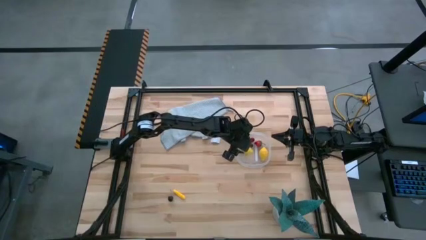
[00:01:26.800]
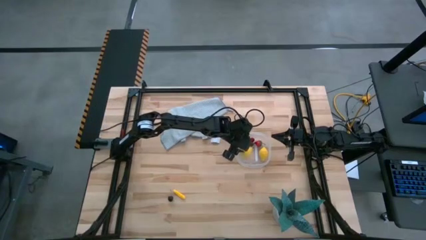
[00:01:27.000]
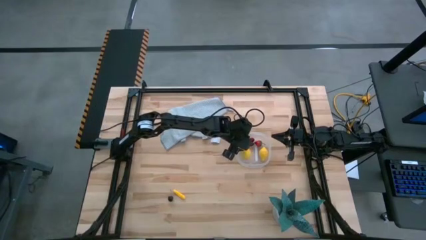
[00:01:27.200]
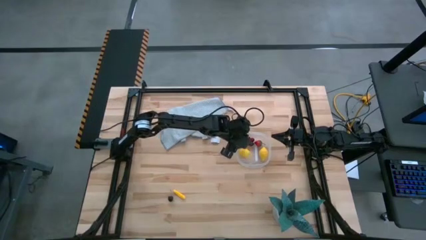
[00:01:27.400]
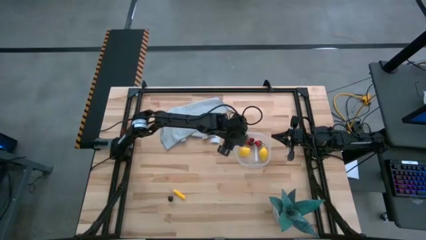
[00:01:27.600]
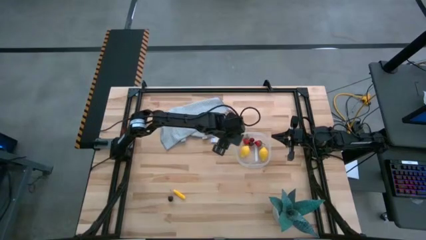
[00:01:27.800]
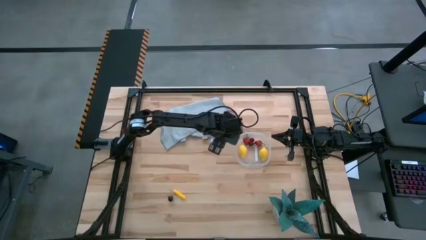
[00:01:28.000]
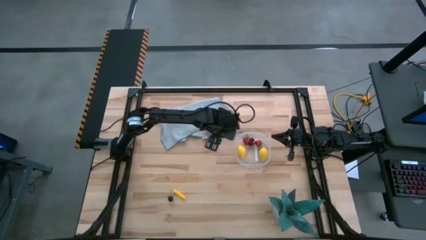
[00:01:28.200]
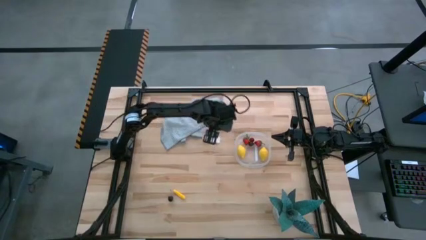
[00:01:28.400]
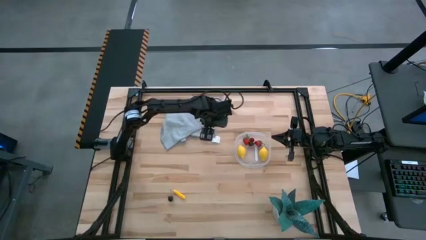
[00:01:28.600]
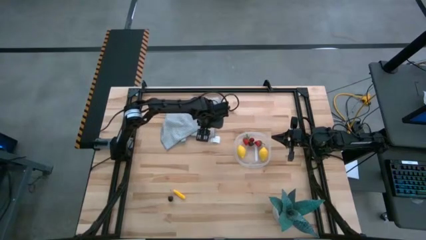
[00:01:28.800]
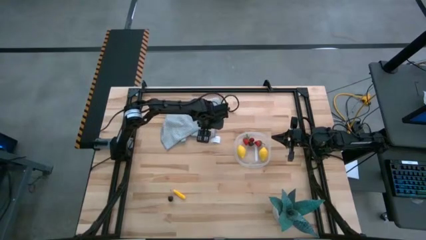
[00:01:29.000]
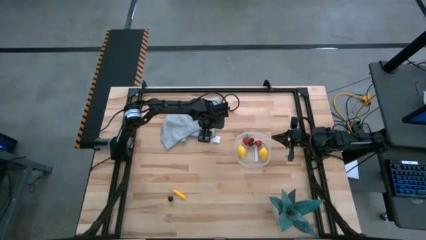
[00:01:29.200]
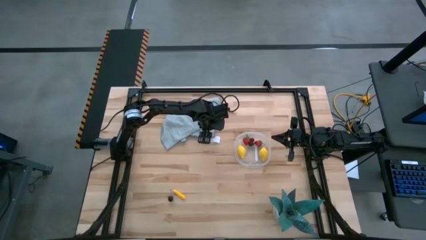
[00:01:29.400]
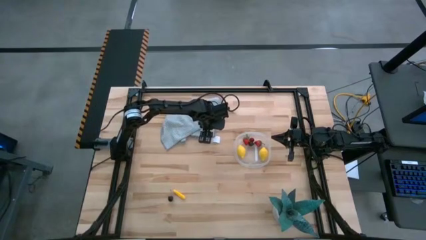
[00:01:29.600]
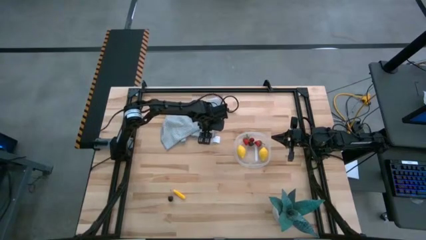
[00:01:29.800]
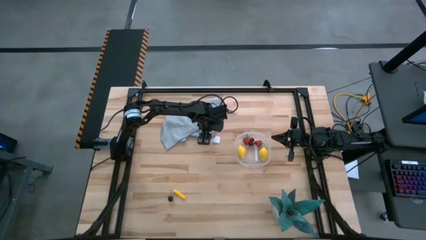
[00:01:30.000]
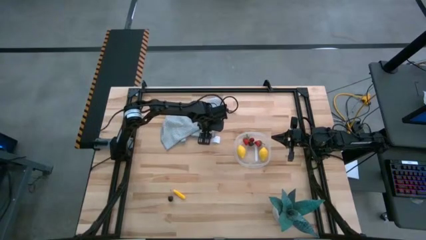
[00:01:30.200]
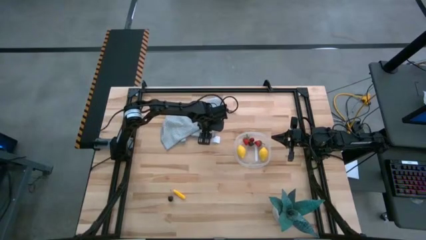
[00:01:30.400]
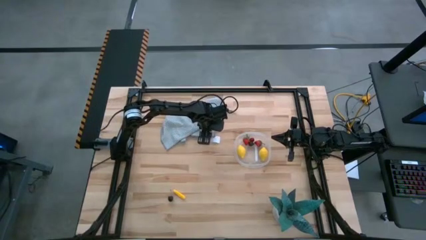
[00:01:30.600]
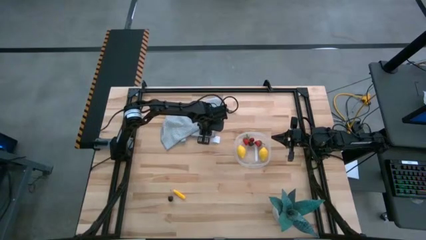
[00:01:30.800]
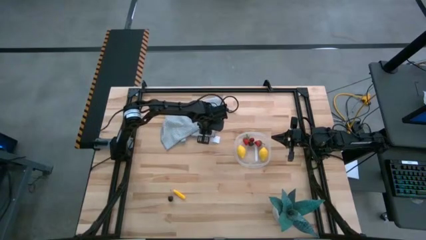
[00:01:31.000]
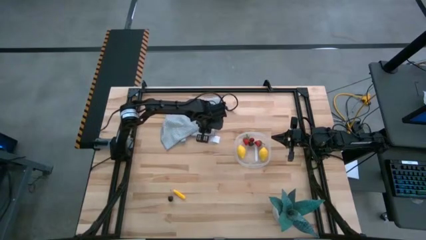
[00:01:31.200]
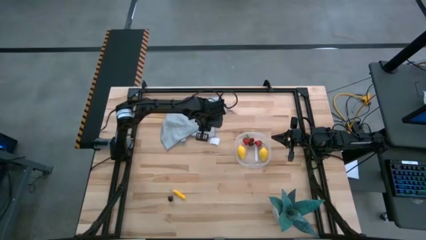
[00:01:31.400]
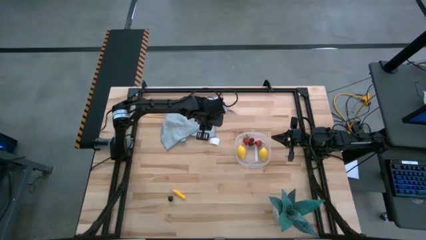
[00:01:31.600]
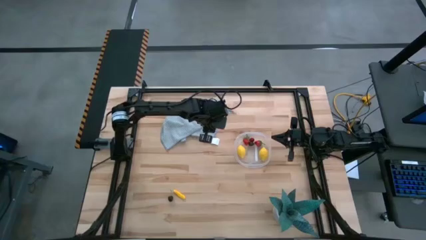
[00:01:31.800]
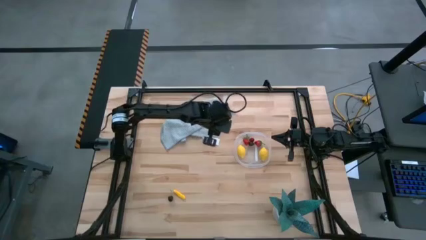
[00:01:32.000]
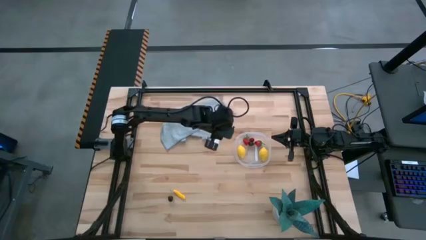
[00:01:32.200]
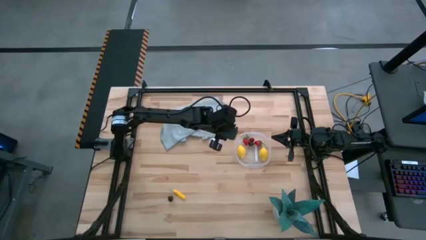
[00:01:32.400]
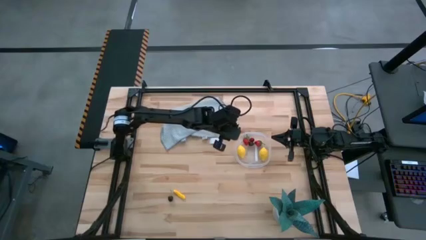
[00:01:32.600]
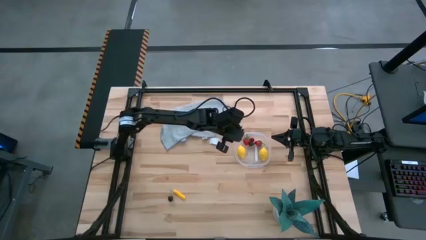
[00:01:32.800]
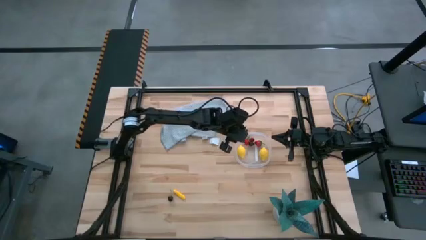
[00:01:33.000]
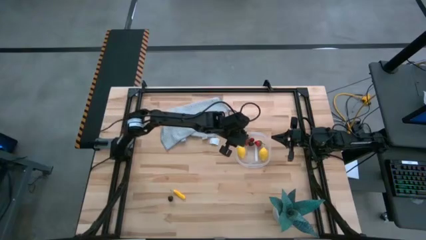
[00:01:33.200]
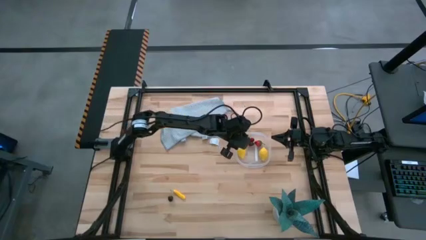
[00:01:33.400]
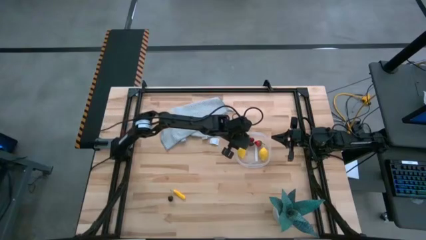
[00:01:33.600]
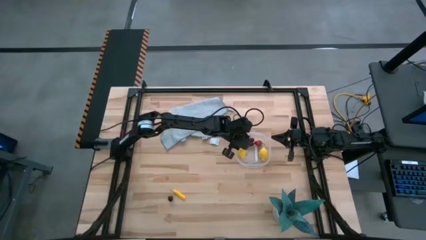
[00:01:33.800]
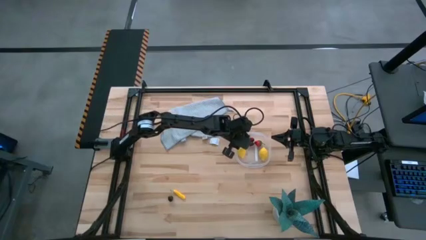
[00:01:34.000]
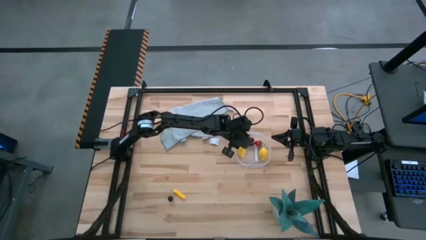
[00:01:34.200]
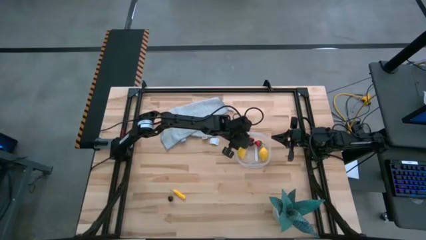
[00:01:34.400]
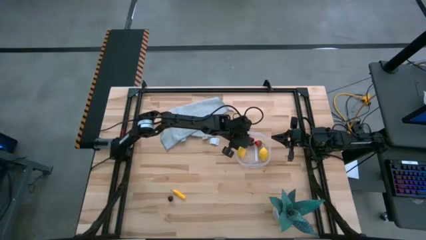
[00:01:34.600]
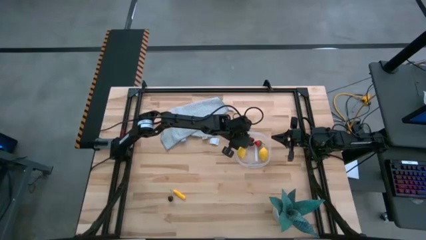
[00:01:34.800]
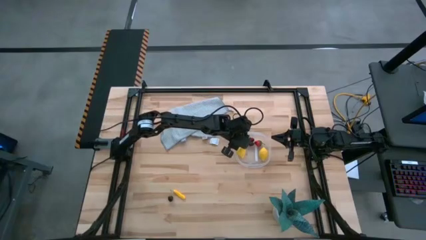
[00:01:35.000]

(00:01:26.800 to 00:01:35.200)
Task: Pick and placing Produce into tupperware
Put the peach into the transparent container

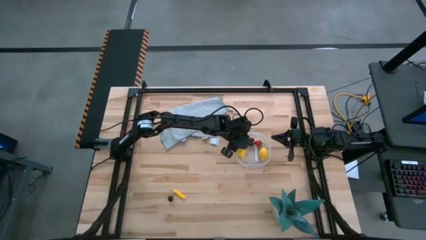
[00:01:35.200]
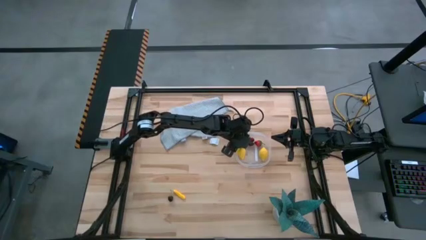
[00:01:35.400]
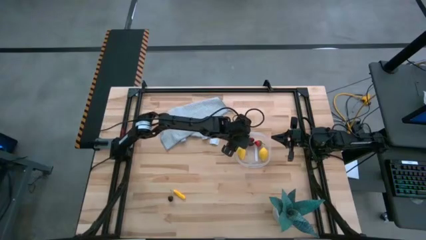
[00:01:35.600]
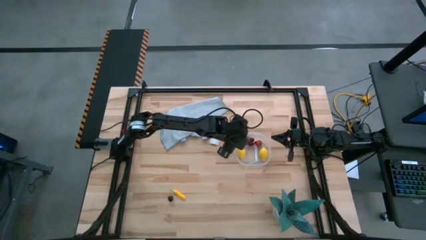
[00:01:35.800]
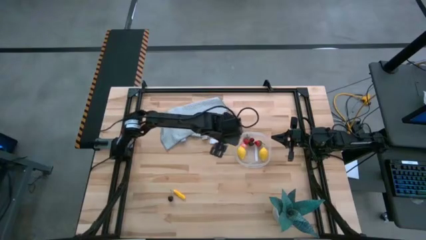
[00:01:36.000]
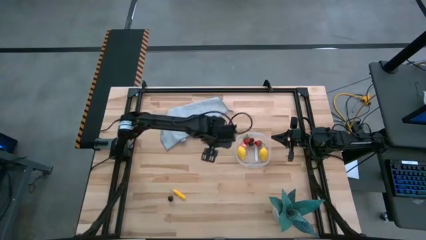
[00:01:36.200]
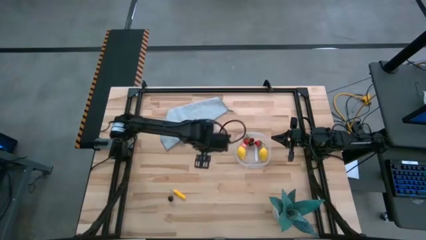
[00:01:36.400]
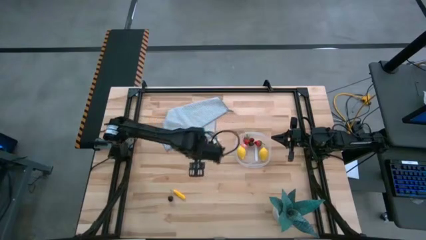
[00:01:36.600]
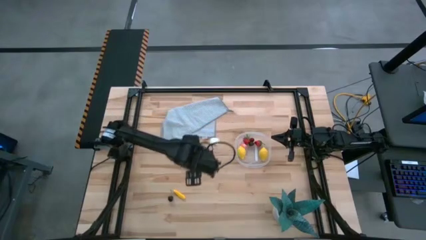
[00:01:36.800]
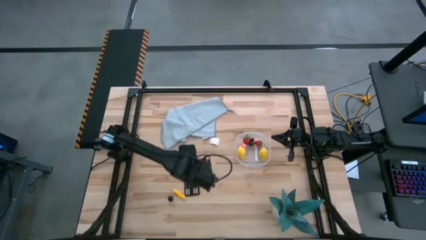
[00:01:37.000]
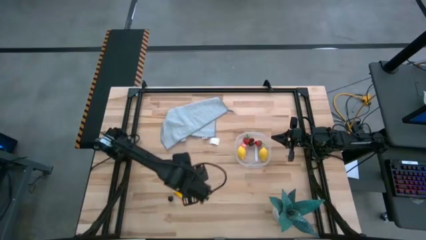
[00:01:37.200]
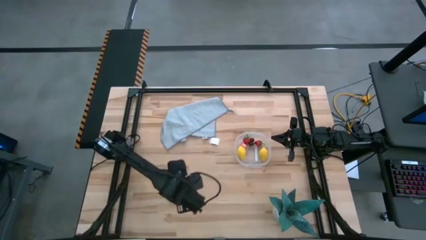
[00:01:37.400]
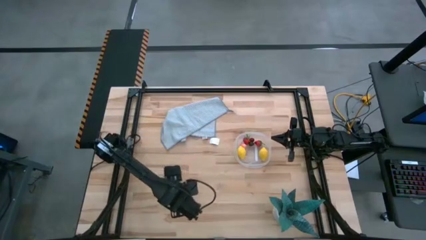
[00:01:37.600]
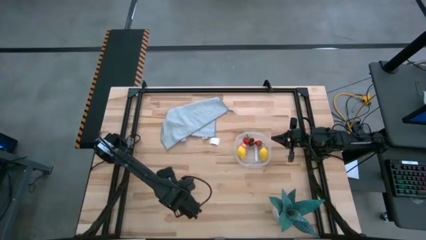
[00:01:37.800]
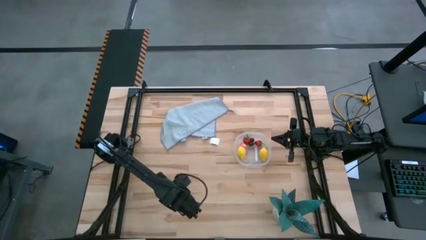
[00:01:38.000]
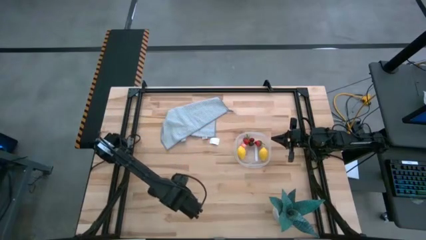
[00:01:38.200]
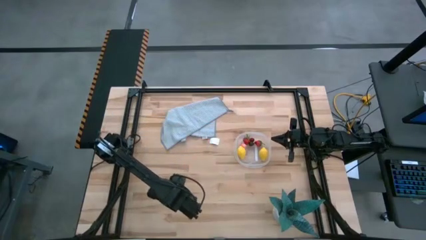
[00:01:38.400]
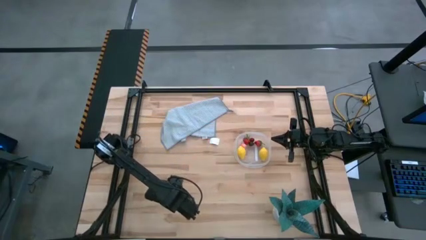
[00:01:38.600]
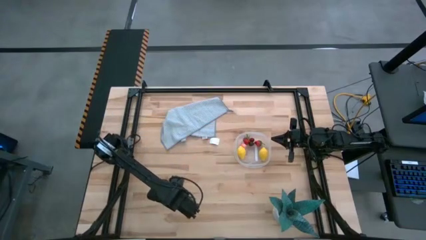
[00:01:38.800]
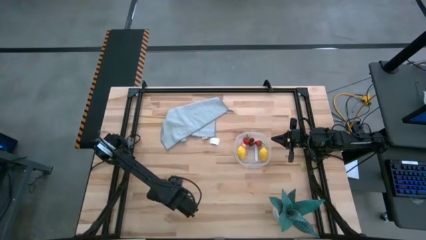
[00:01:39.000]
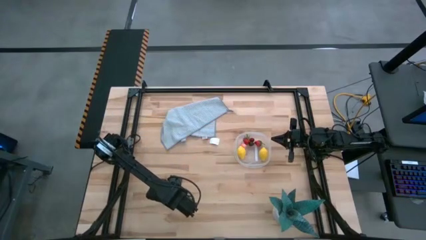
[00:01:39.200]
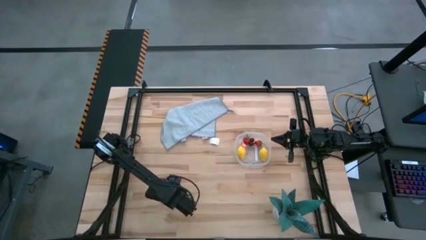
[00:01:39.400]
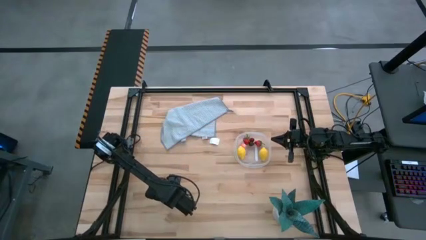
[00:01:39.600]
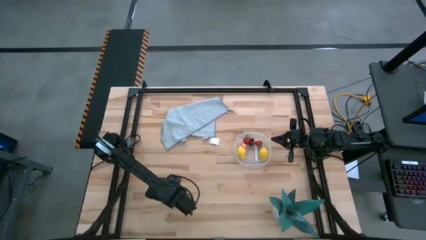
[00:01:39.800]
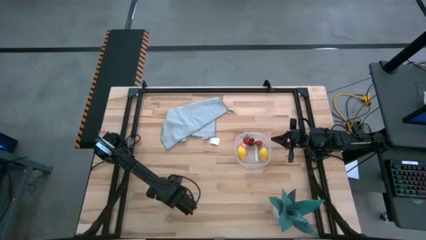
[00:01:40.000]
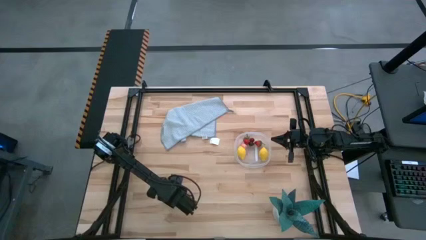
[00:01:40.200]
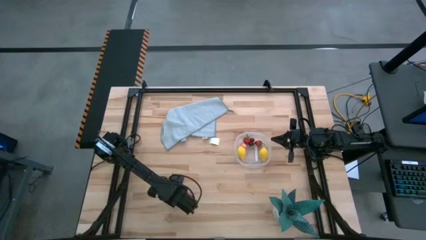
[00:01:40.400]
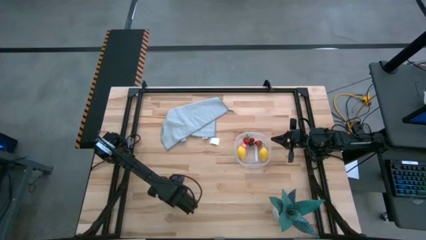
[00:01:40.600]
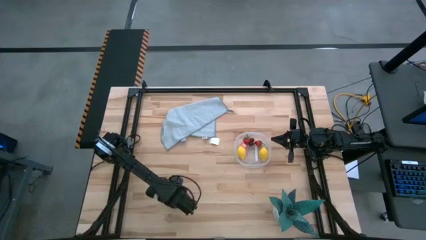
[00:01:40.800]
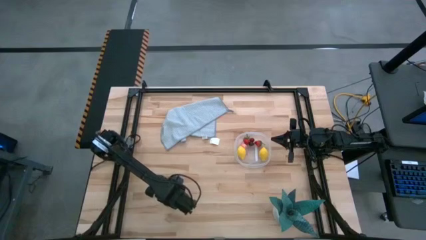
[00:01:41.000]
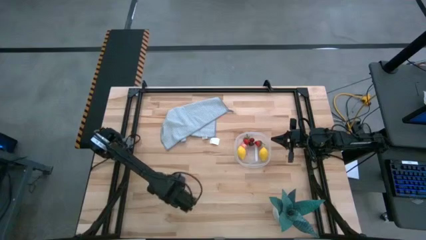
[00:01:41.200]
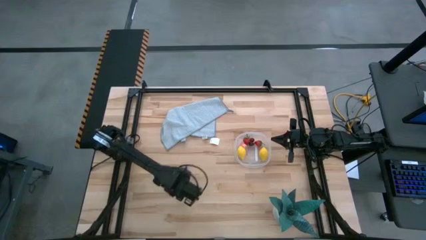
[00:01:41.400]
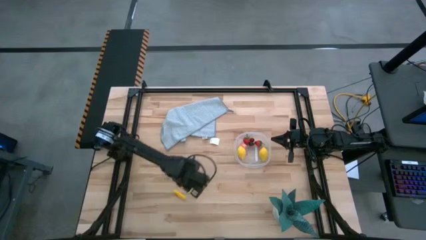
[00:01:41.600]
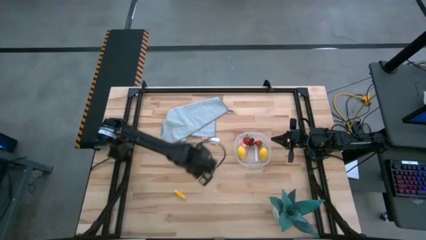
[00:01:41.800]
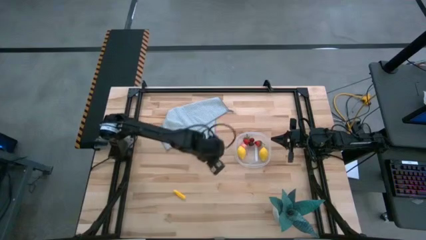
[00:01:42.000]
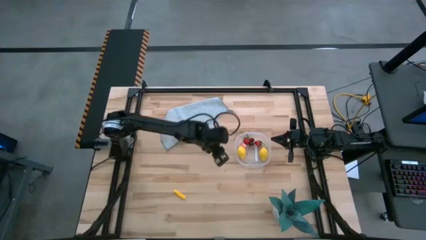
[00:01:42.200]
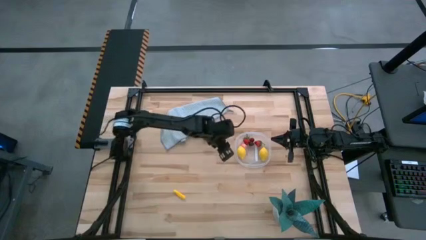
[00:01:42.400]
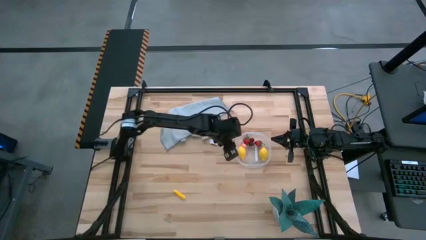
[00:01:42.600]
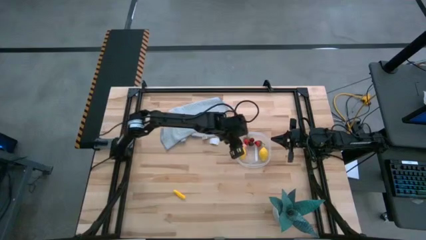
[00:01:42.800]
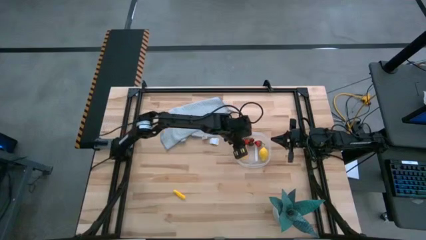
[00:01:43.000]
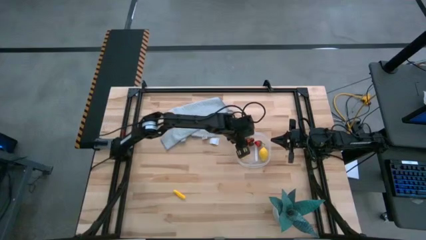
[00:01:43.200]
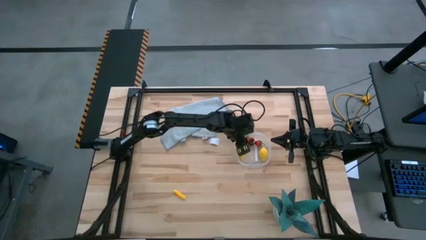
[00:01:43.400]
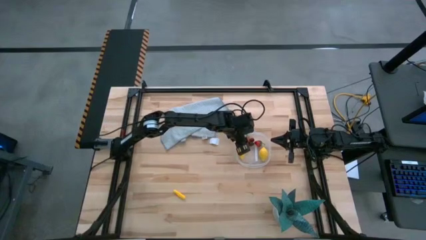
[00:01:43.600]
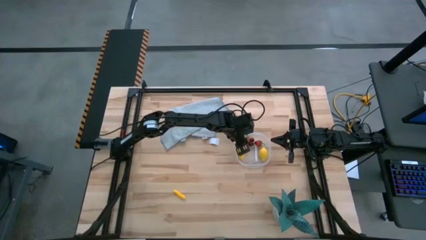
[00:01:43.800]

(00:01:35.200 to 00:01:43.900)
Put the cherry into the transparent container
